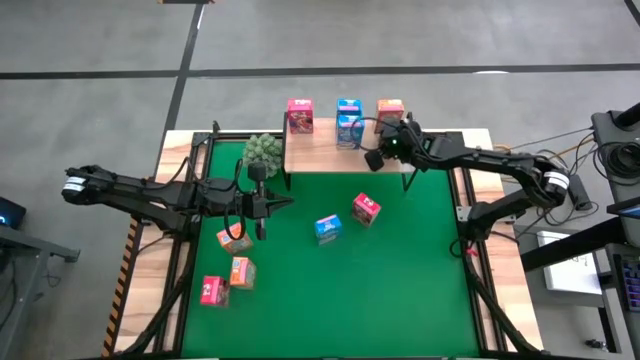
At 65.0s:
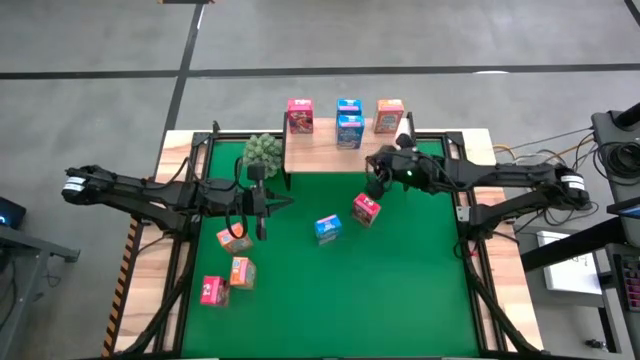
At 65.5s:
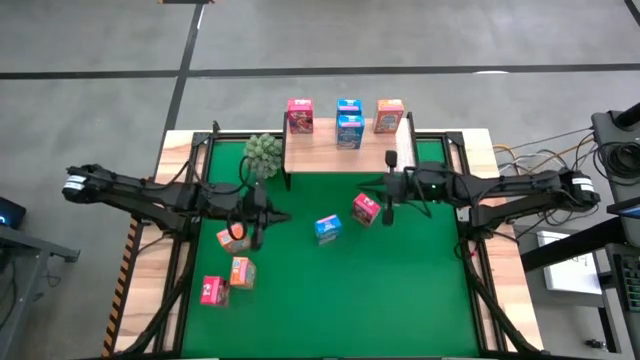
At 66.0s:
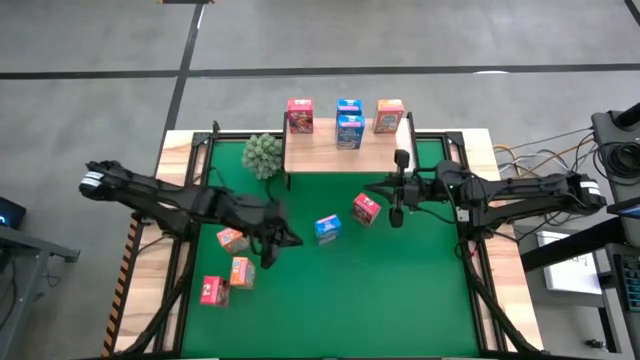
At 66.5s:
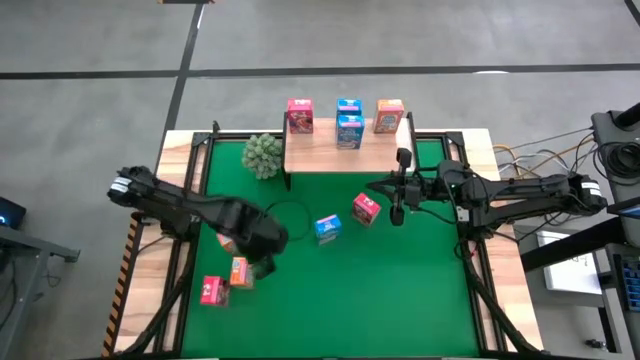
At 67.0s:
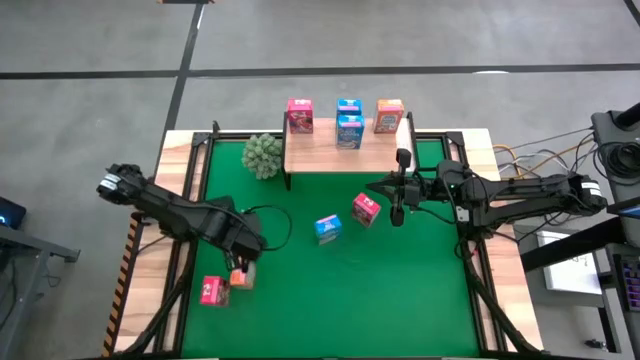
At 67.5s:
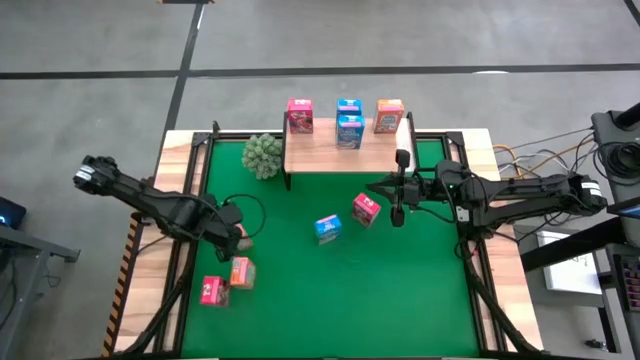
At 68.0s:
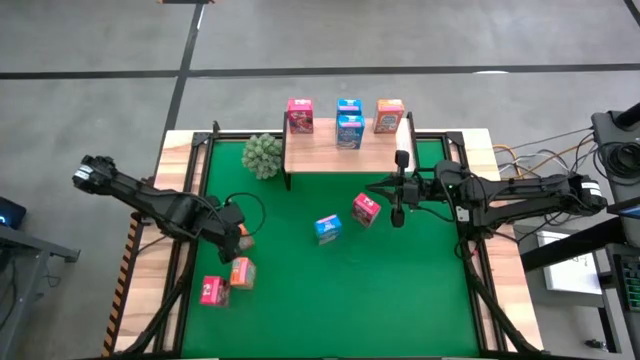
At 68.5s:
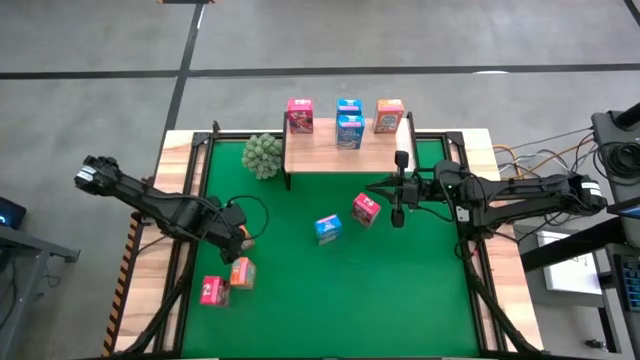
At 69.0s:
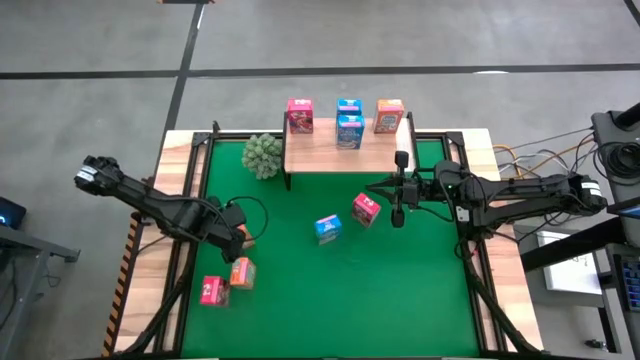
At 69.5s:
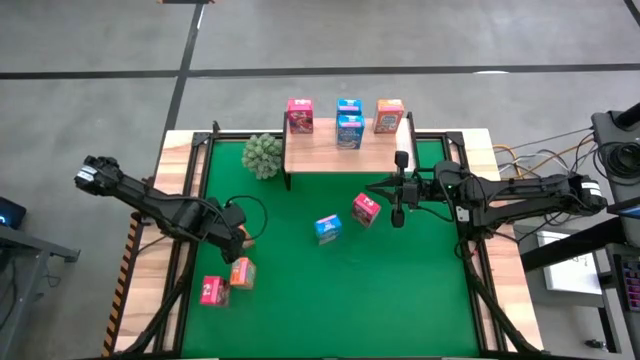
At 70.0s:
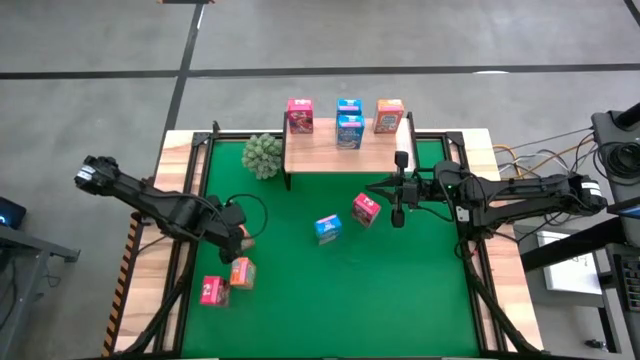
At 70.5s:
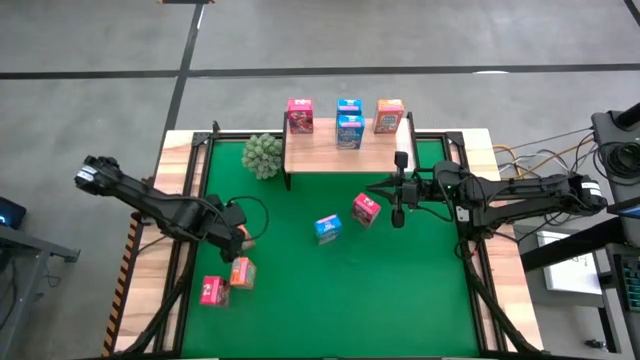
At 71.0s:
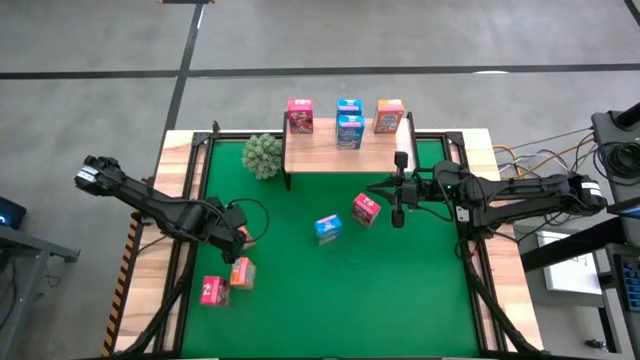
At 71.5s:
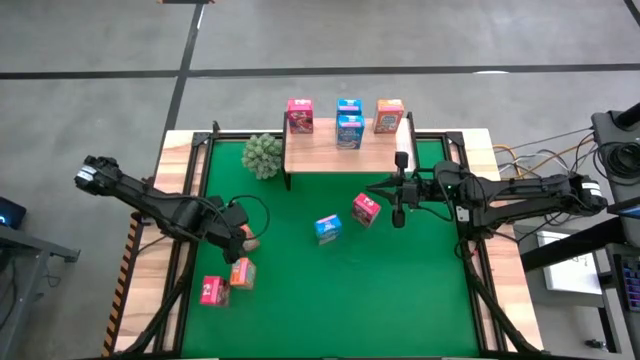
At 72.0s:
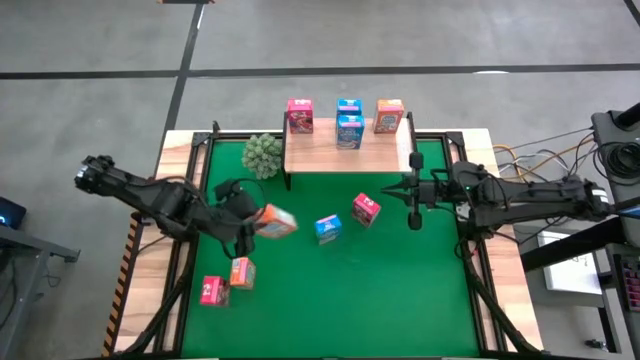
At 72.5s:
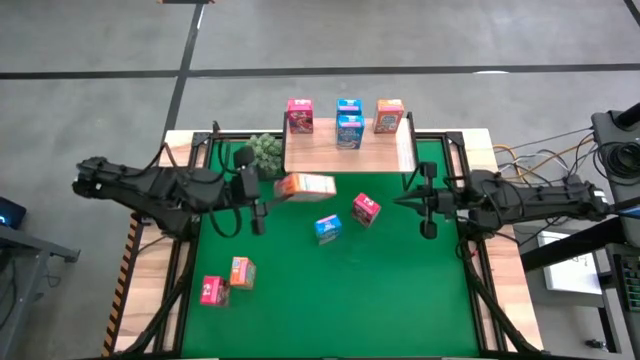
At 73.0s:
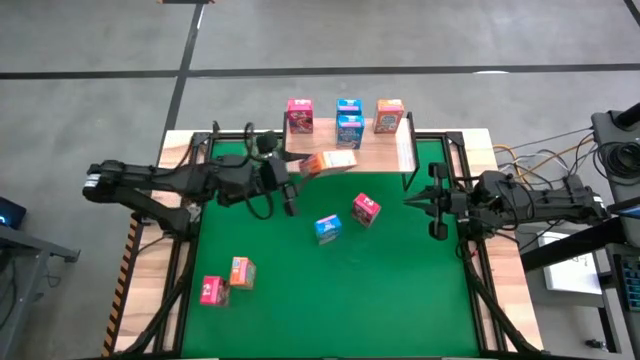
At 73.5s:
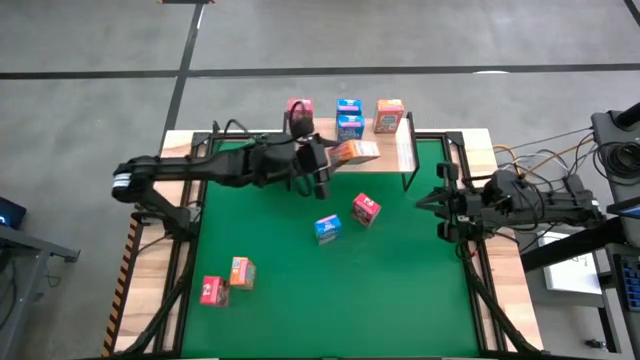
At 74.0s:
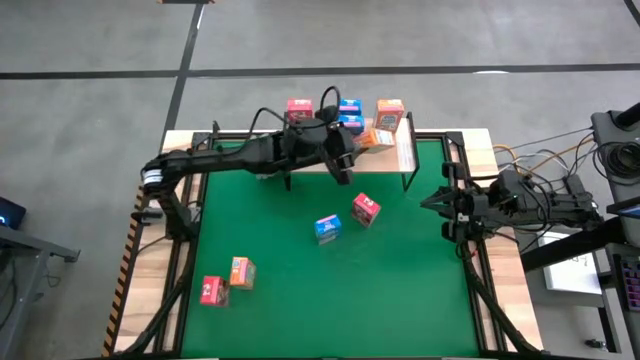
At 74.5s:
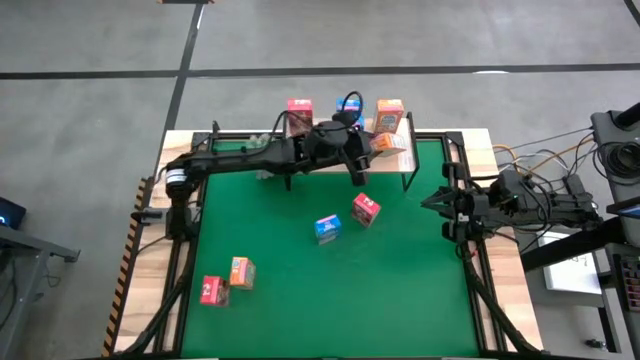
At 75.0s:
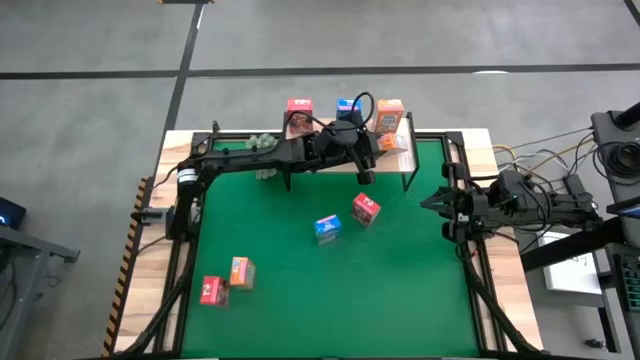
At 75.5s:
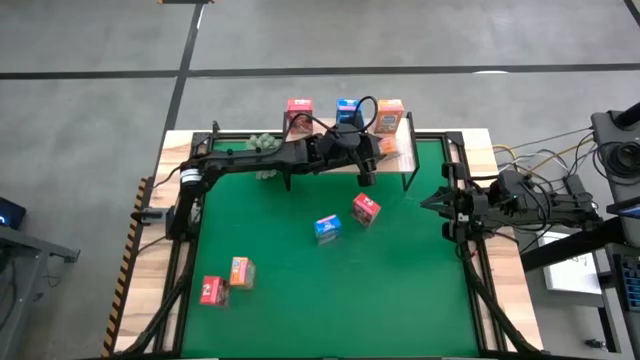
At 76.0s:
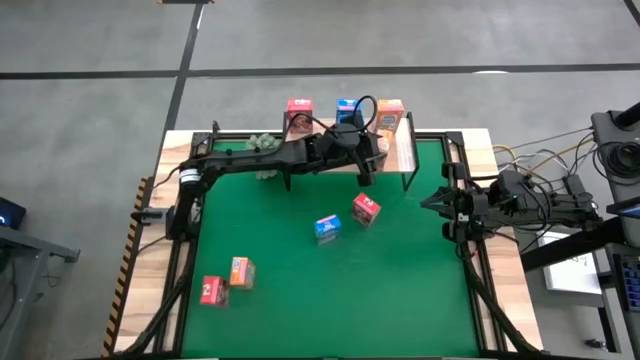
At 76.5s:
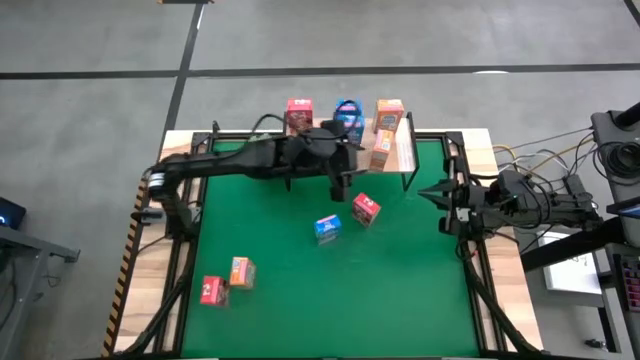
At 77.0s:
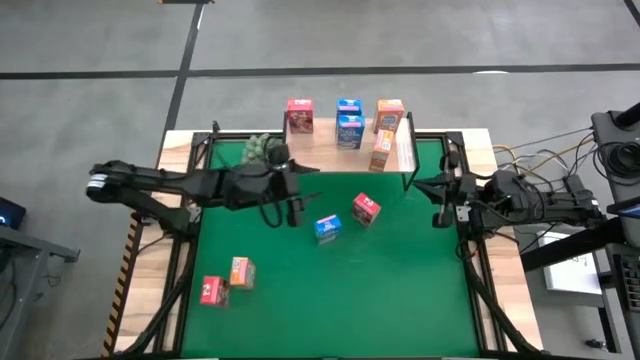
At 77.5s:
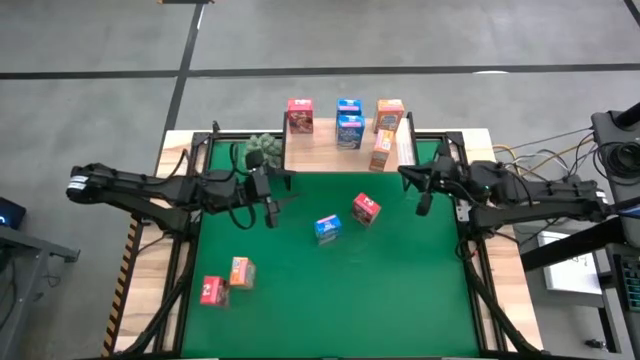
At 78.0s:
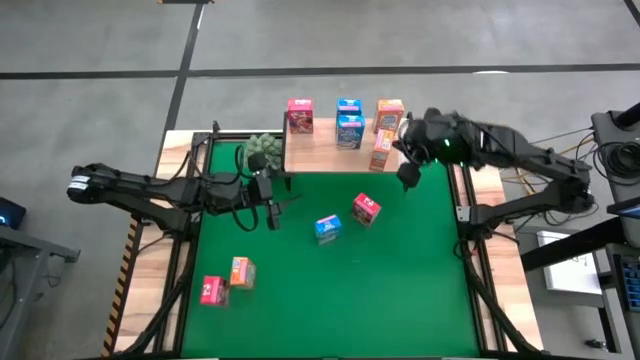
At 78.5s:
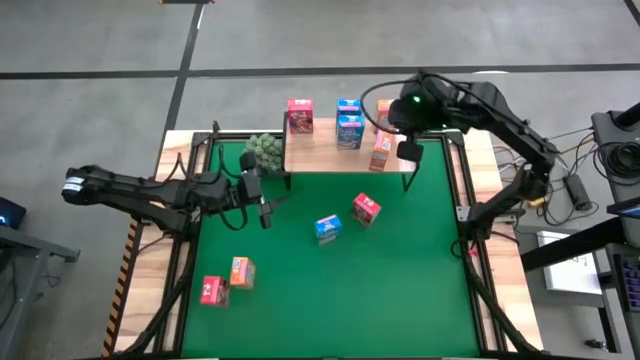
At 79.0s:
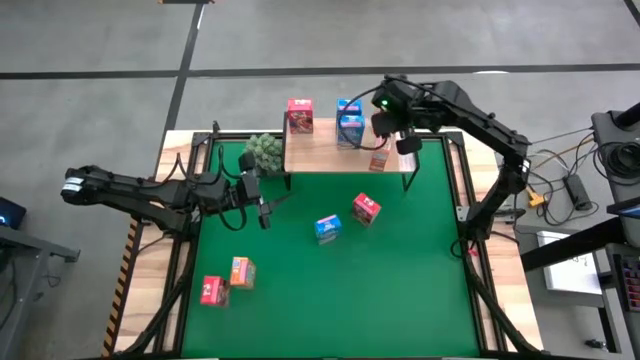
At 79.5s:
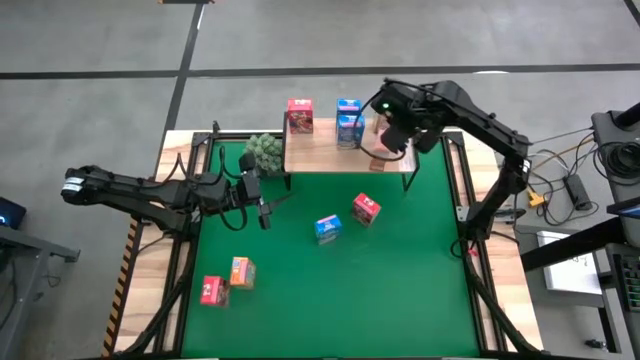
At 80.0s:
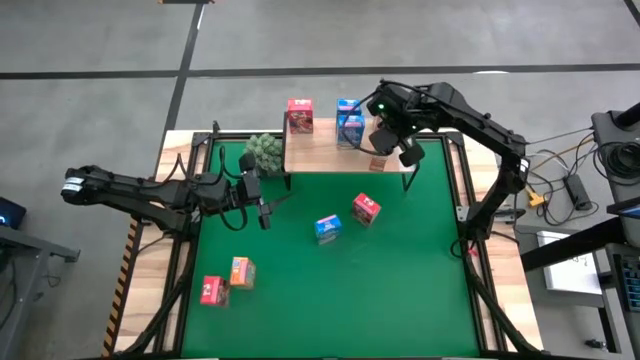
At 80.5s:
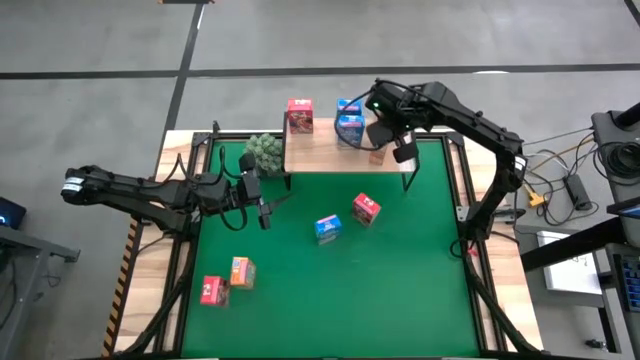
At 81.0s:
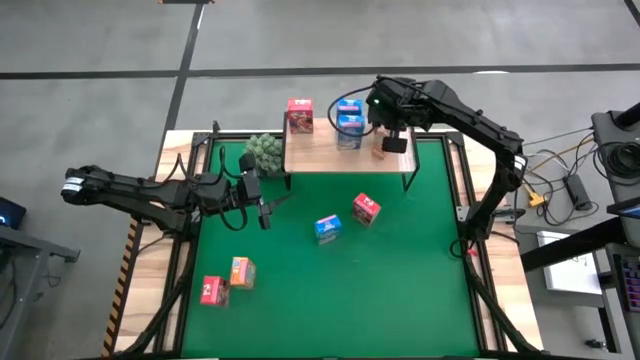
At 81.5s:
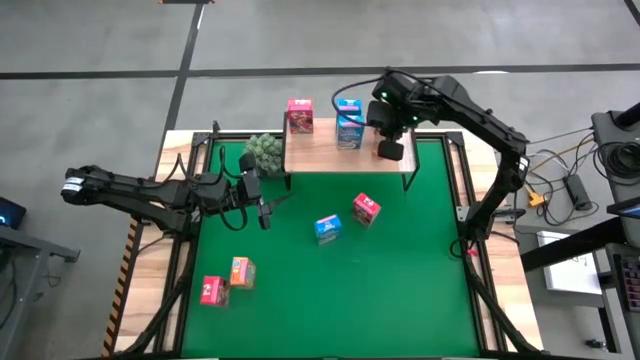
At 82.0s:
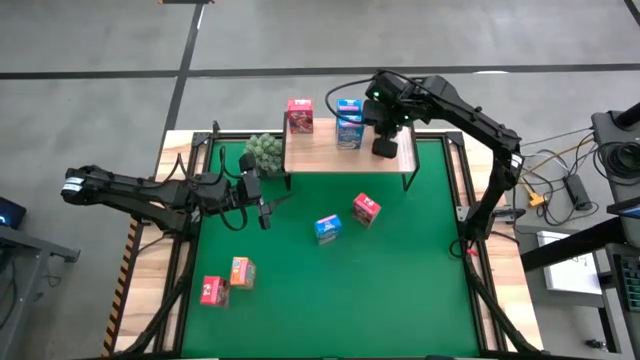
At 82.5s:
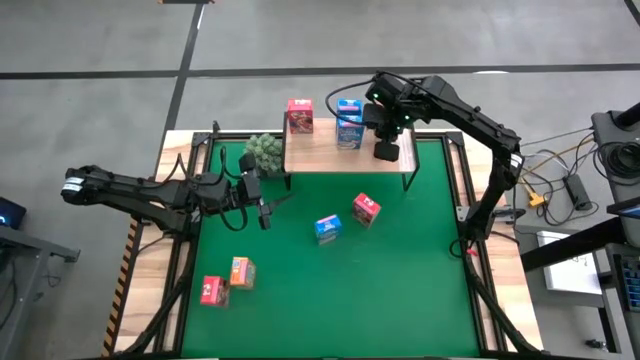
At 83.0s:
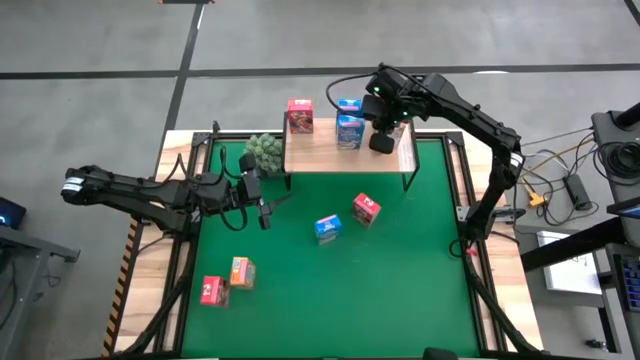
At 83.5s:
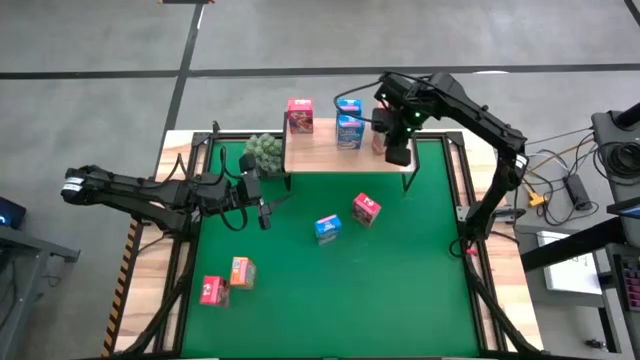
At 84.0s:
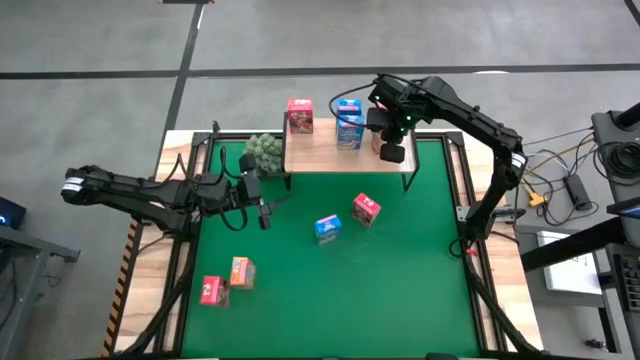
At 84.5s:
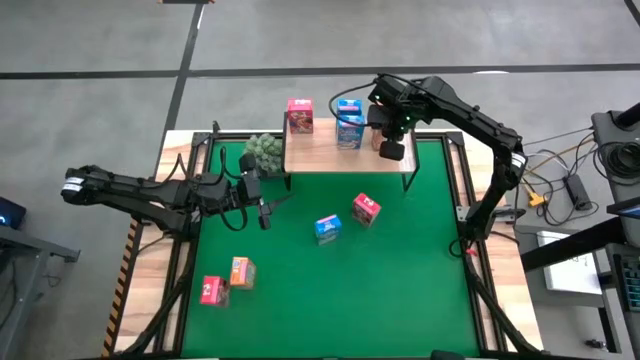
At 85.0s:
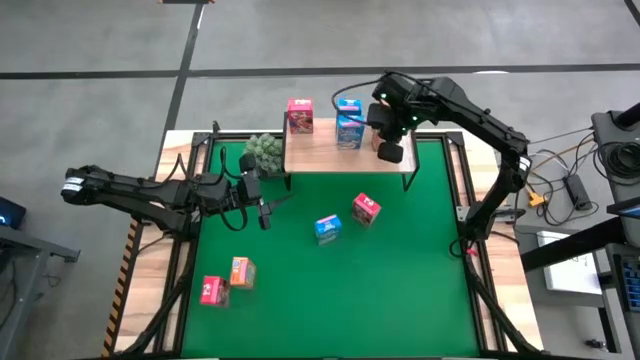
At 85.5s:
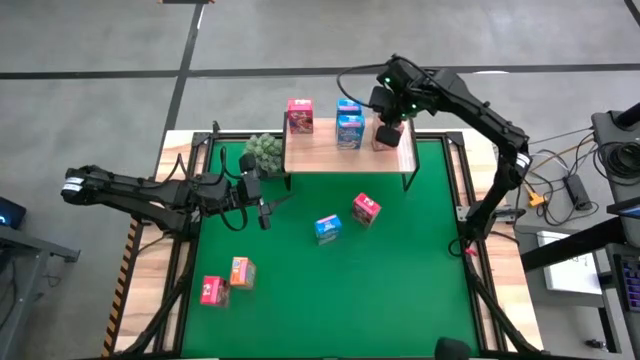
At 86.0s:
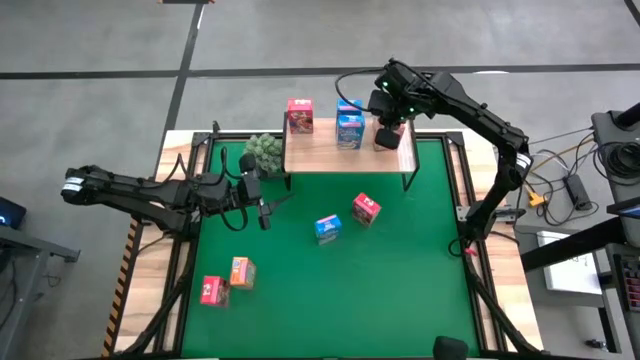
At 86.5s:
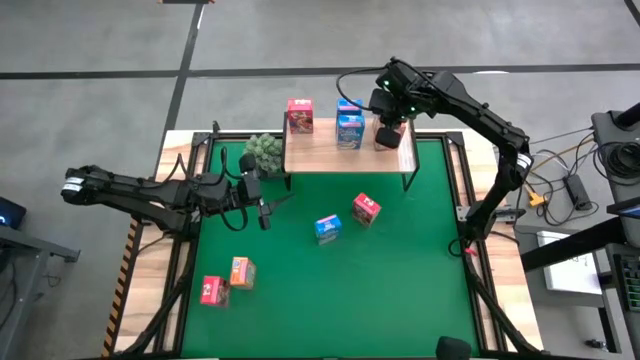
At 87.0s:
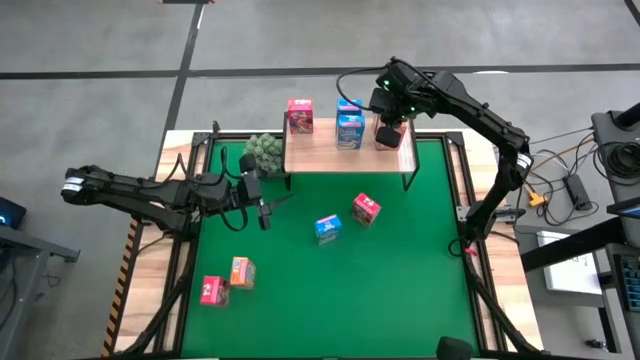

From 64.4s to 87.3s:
Task: Stack cereal on shelf
Put the top orange cereal box on the shelf aligned with the other orange cereal box
